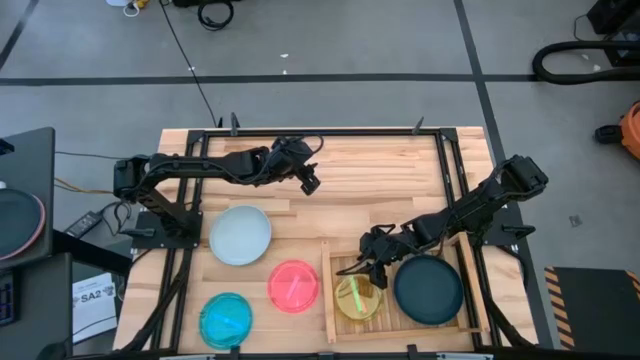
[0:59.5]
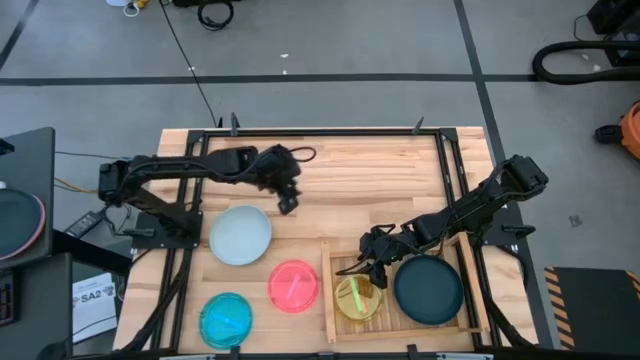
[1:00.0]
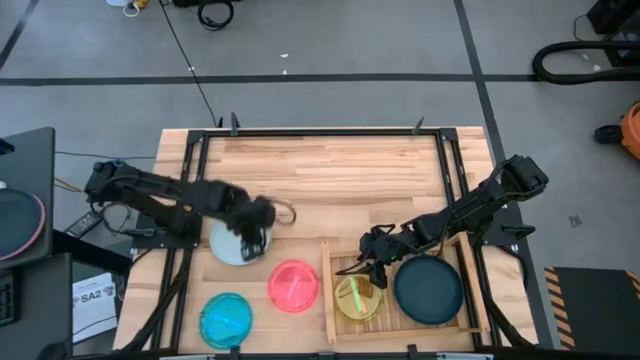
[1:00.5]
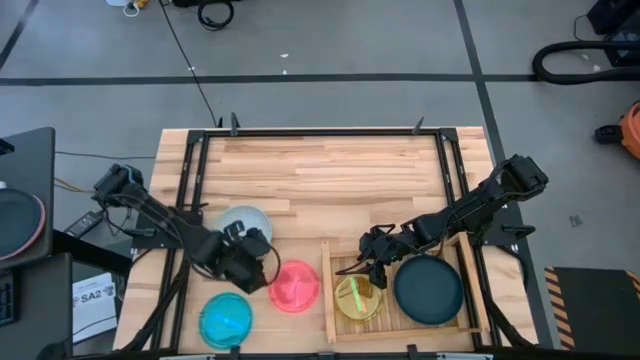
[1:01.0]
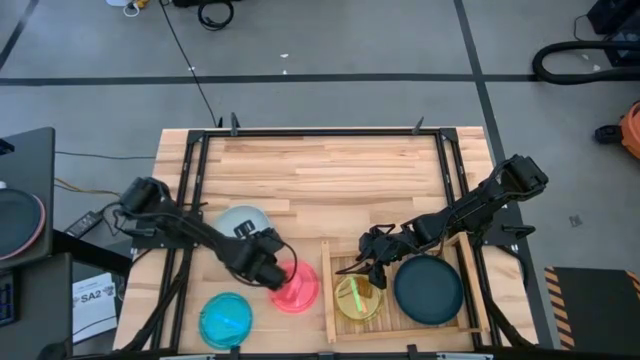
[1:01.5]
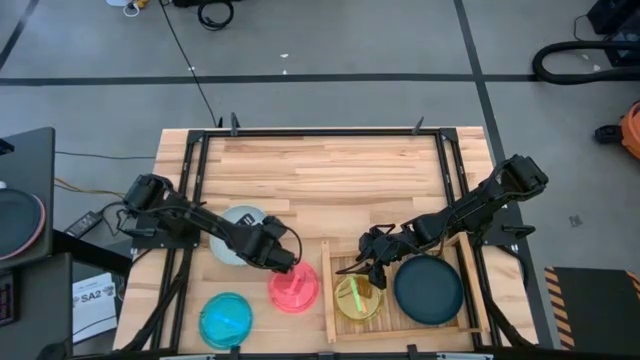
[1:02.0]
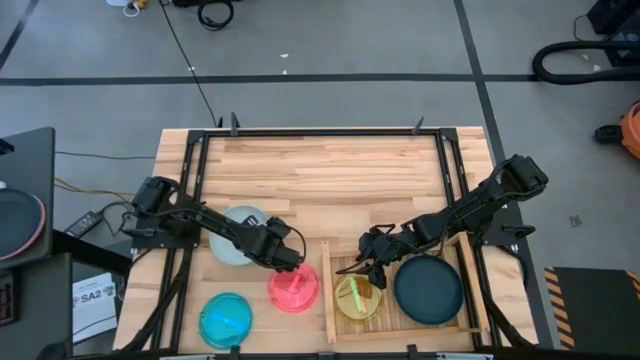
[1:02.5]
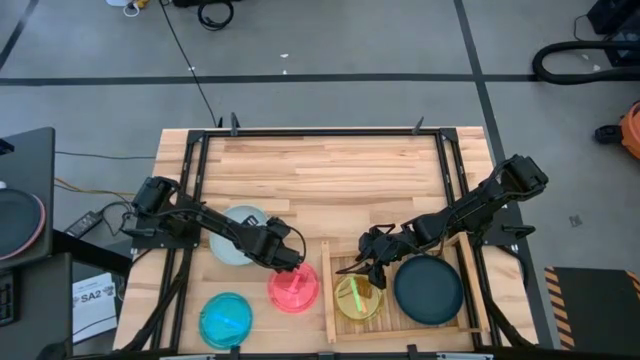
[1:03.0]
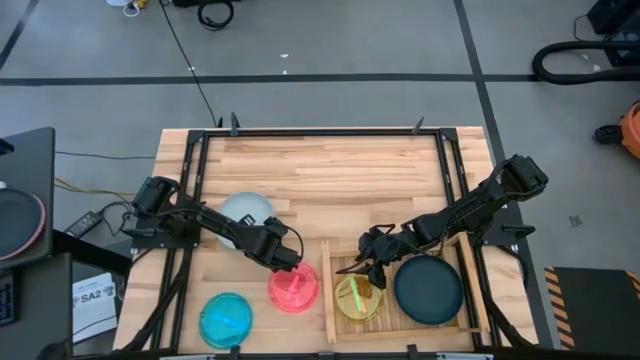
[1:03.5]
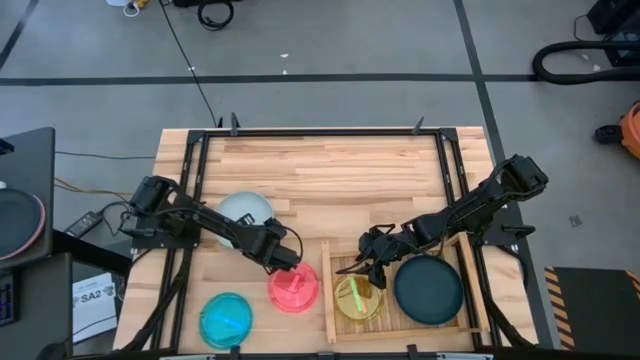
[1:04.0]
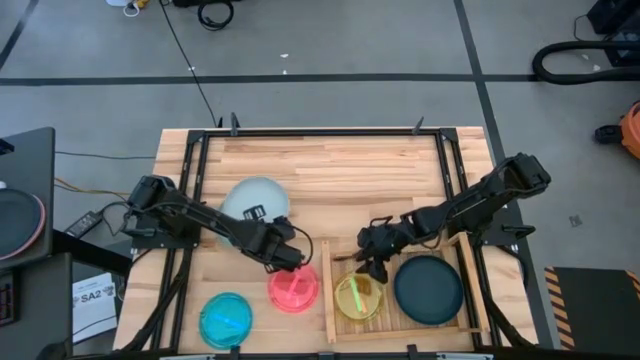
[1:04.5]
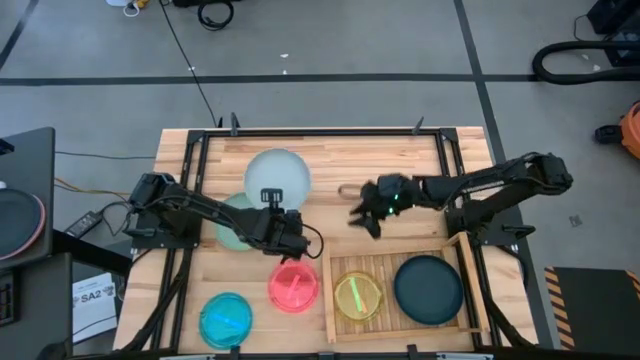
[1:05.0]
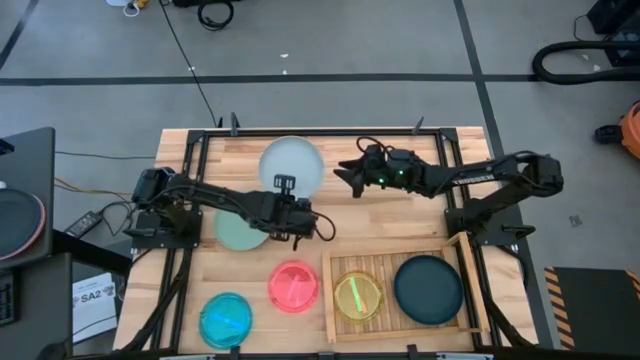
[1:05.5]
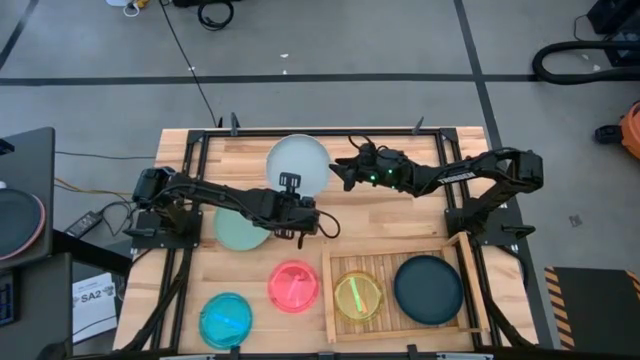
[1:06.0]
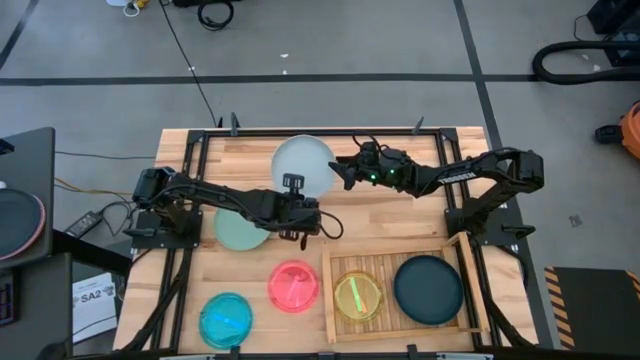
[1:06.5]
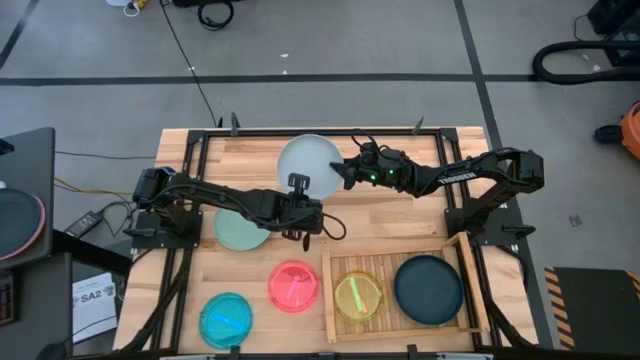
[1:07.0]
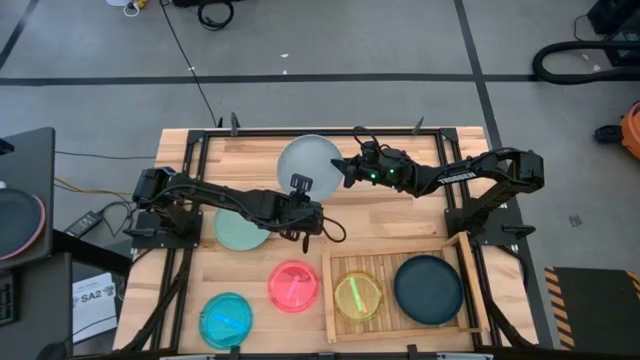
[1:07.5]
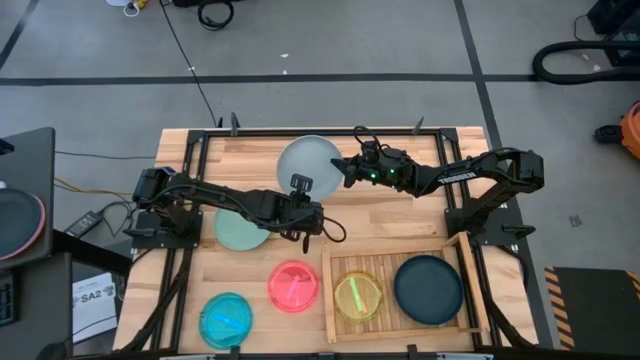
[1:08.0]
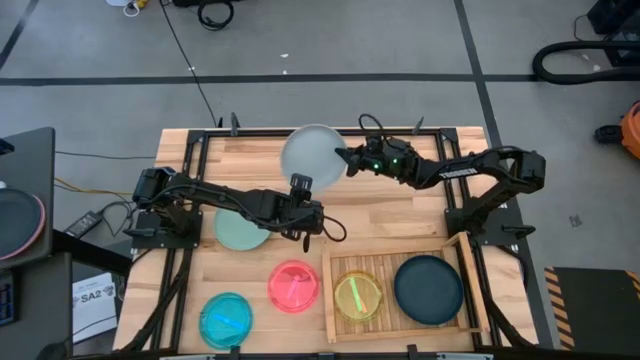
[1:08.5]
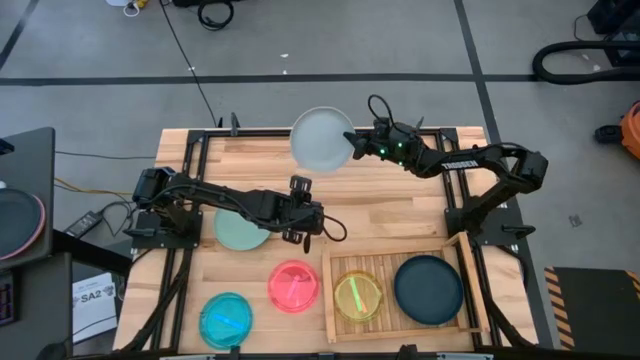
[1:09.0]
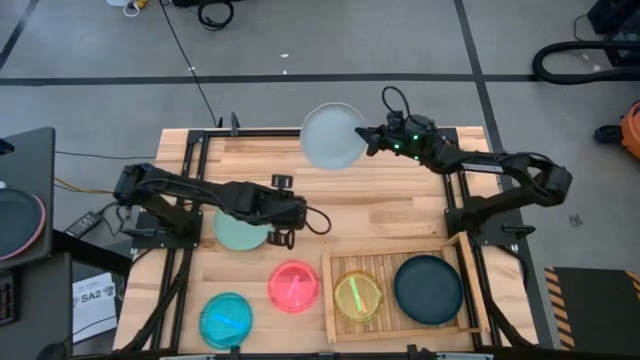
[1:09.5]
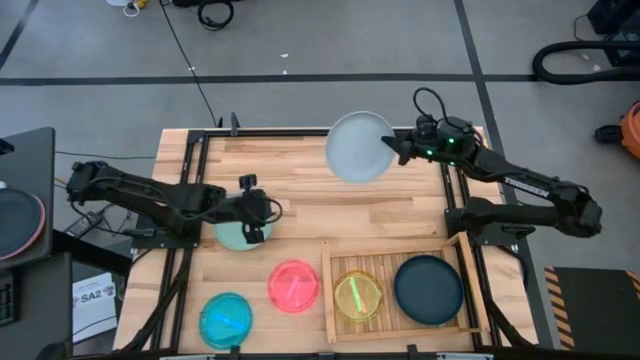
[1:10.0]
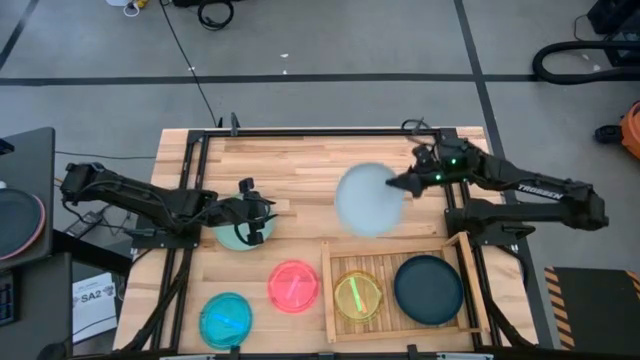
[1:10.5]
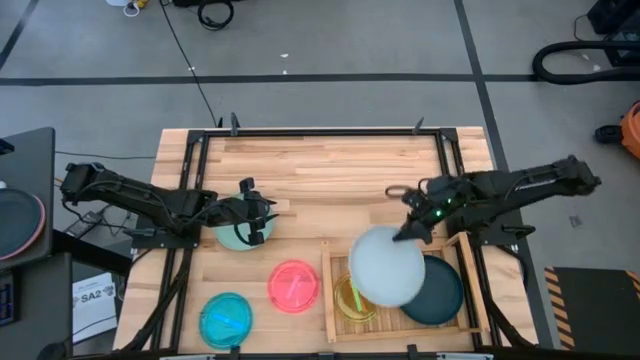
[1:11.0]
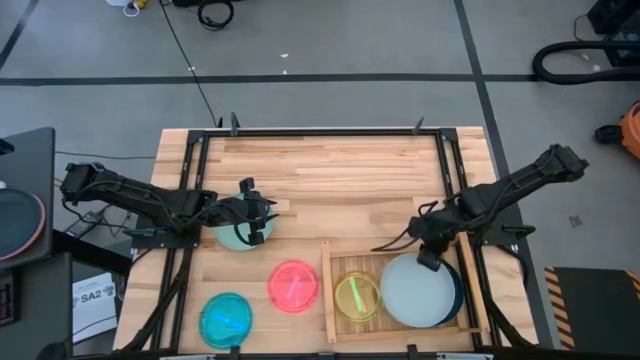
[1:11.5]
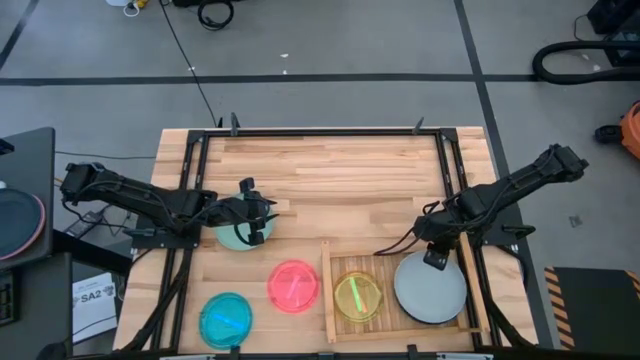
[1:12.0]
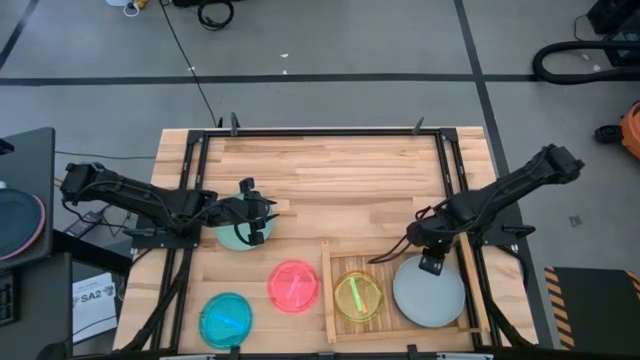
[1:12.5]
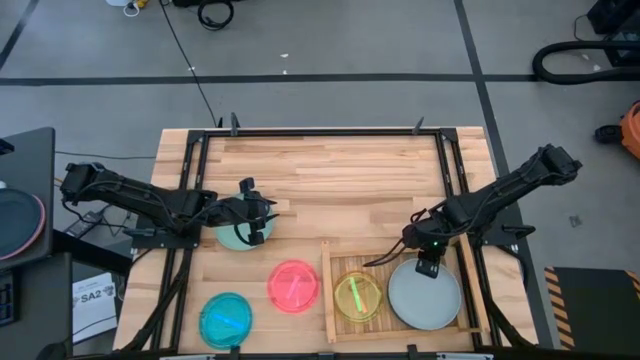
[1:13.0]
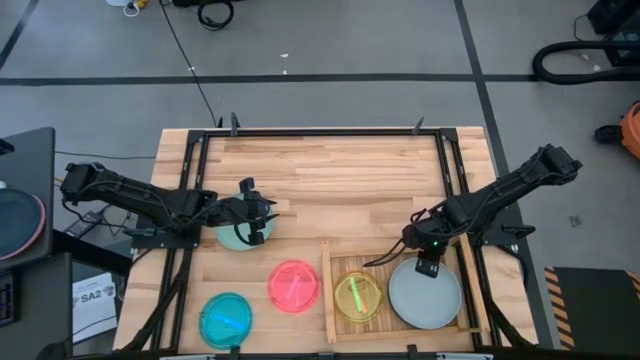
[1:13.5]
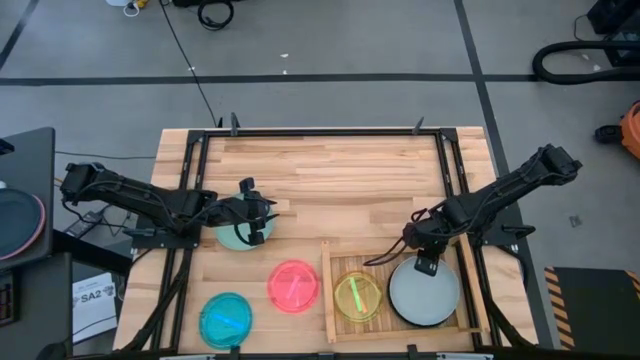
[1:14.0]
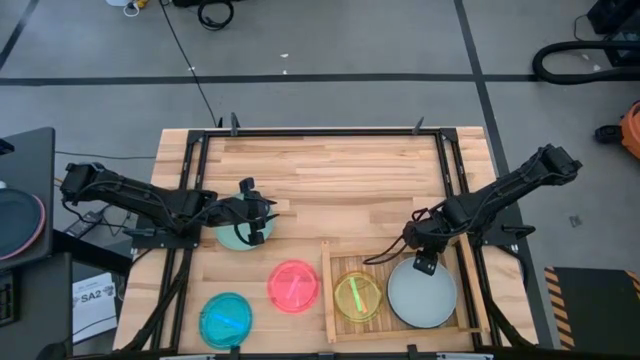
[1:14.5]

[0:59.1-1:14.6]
Task: Place and stack plates onto a shelf
Stack the gray plate on the dark blue plate on the shelf

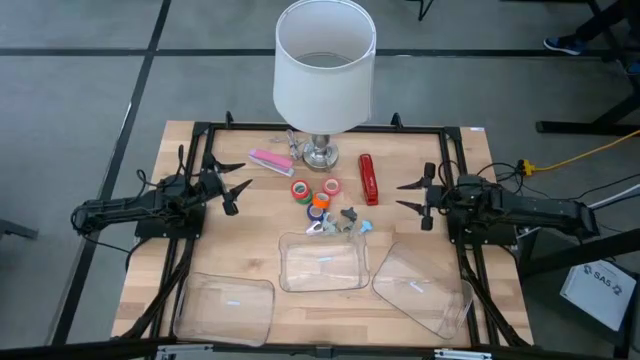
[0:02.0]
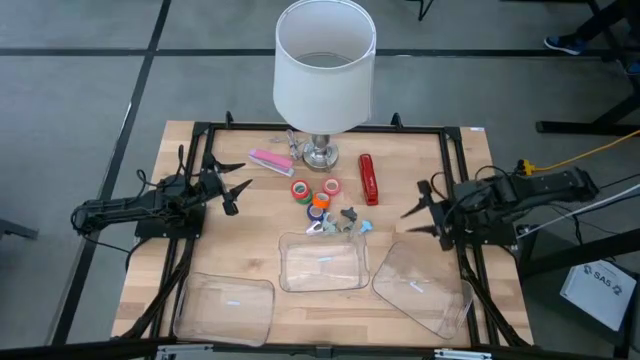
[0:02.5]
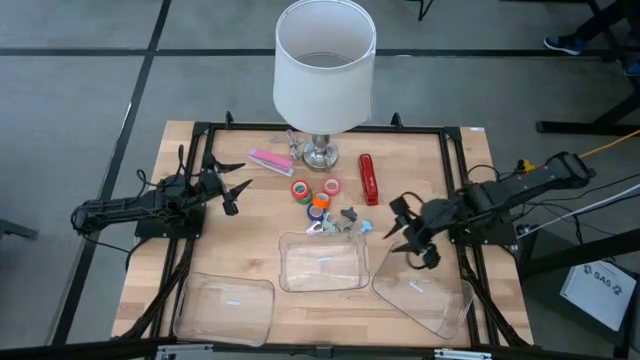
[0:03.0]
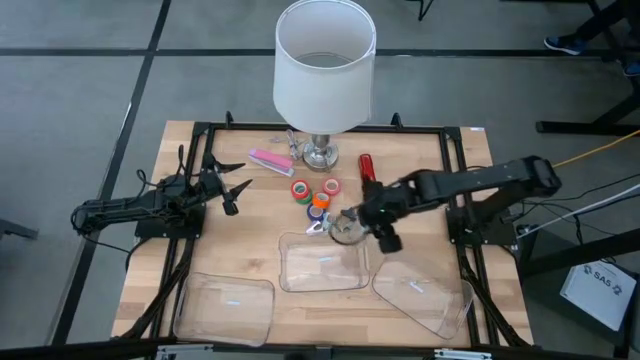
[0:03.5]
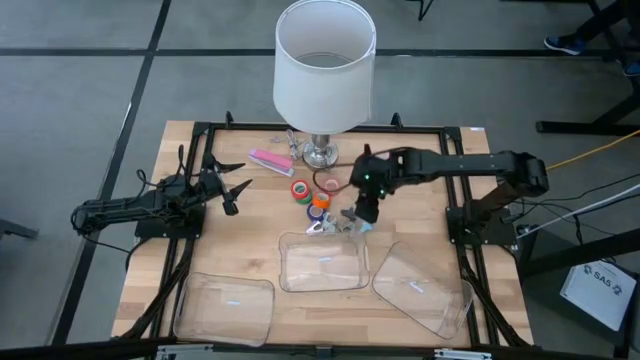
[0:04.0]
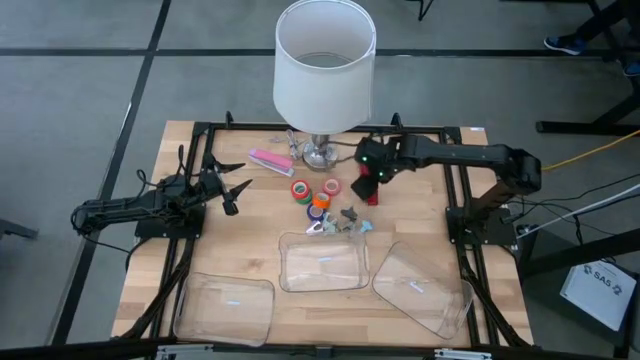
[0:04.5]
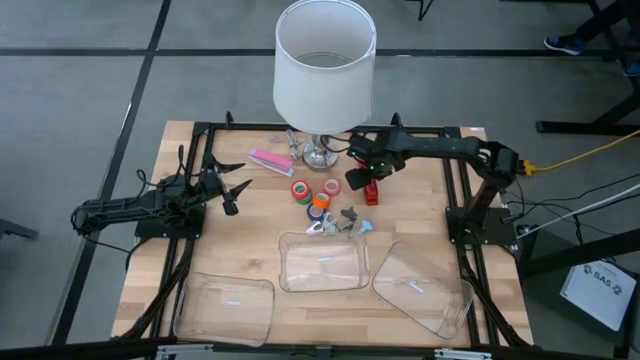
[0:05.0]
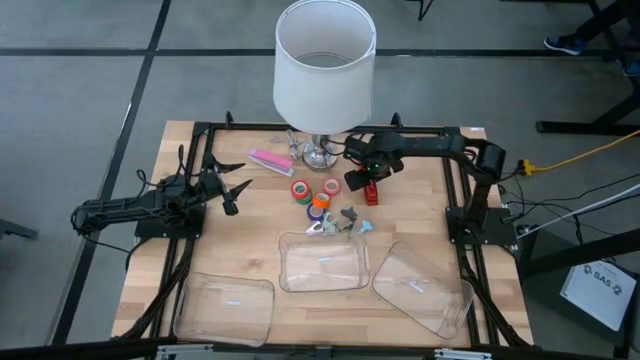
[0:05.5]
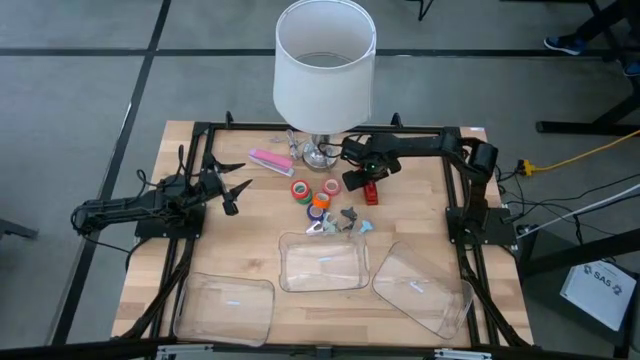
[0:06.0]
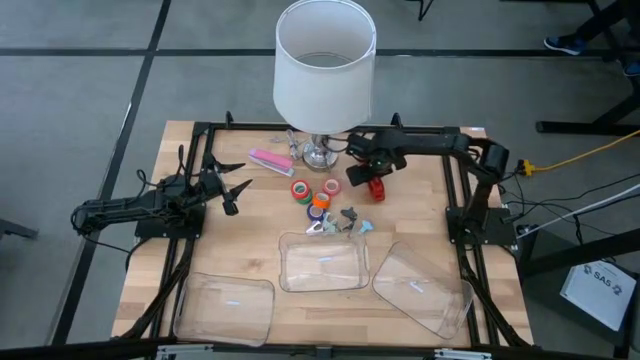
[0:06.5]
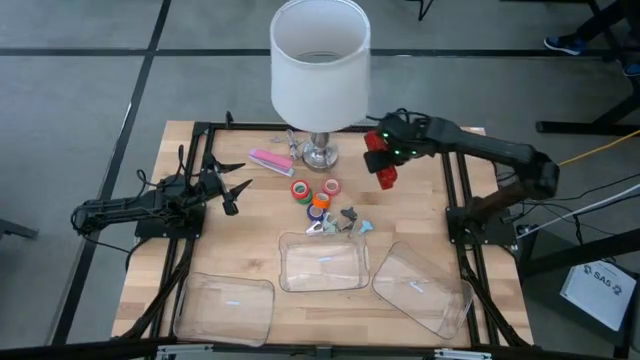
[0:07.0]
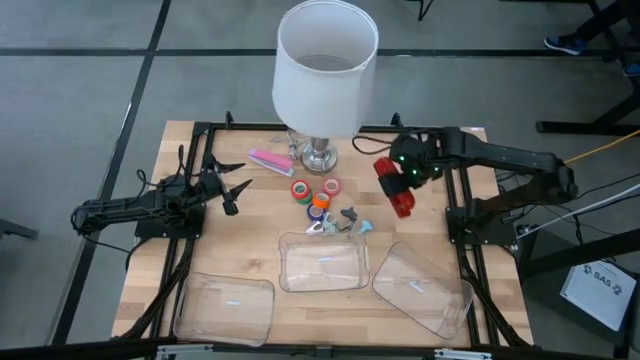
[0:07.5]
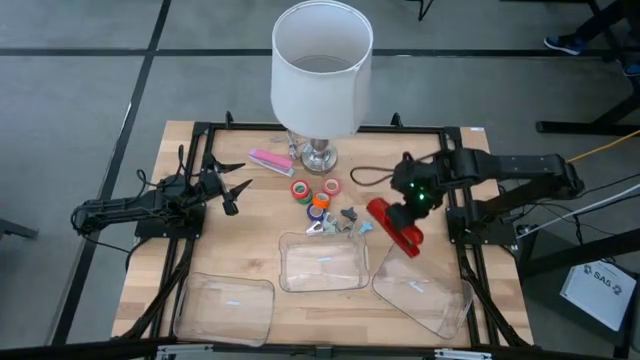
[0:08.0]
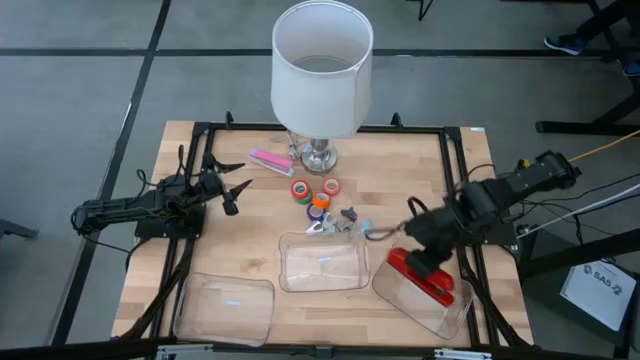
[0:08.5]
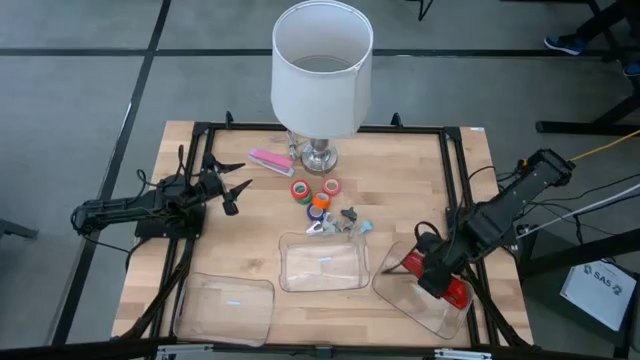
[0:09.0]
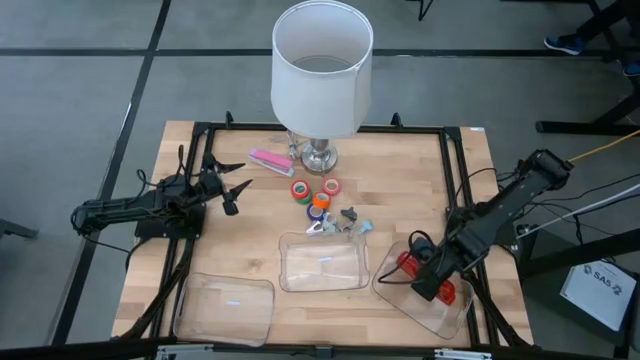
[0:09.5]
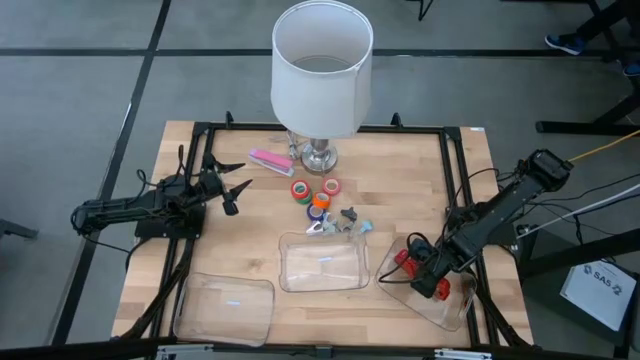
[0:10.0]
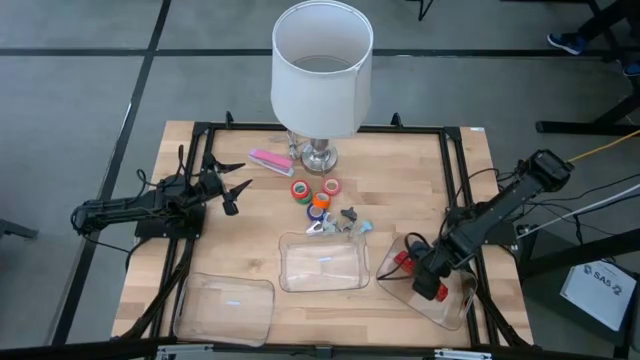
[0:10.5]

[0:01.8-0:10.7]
Task: Pick and place Stapler, Stapler remover, tape
Put the red stapler into the bottom right transparent bin
